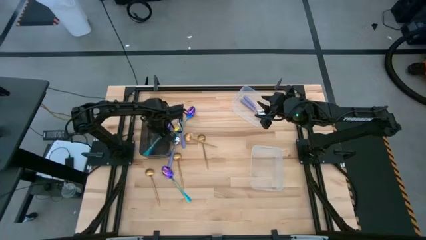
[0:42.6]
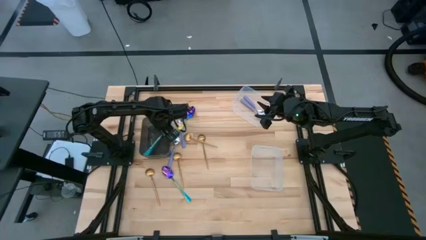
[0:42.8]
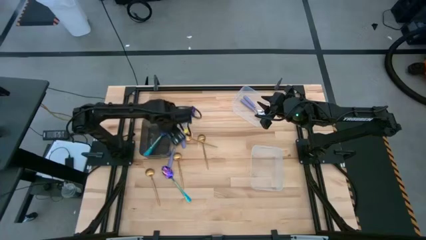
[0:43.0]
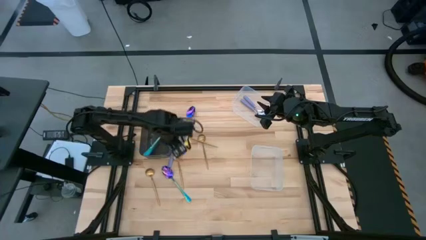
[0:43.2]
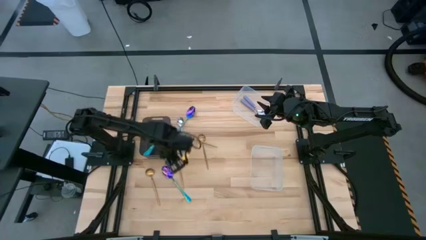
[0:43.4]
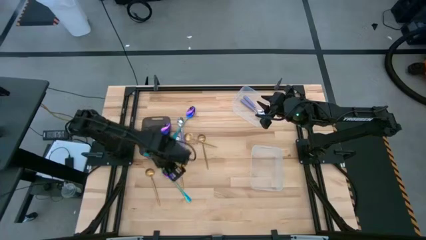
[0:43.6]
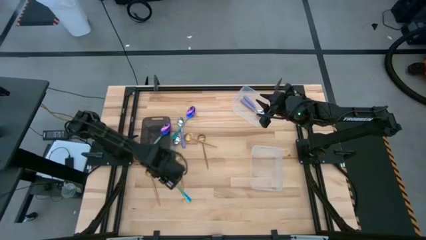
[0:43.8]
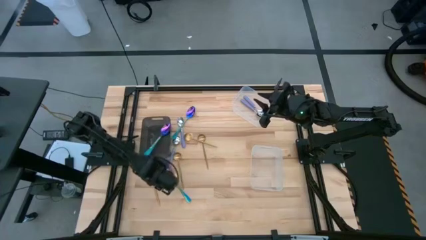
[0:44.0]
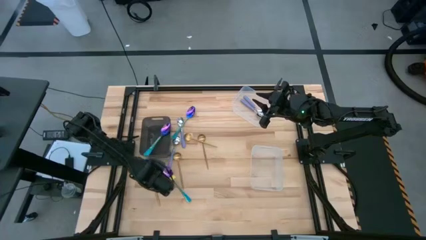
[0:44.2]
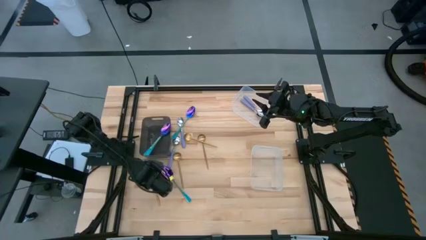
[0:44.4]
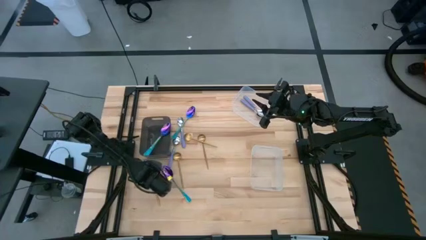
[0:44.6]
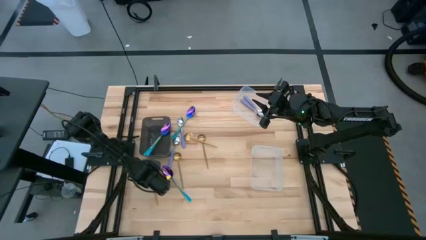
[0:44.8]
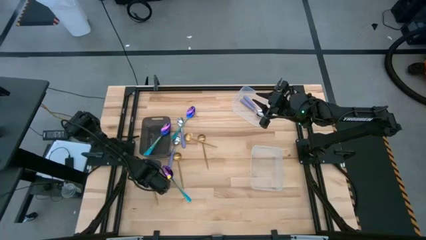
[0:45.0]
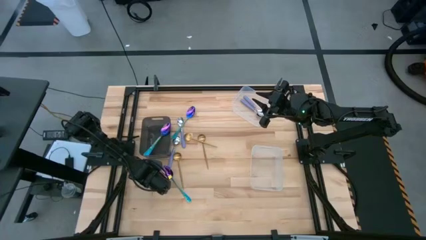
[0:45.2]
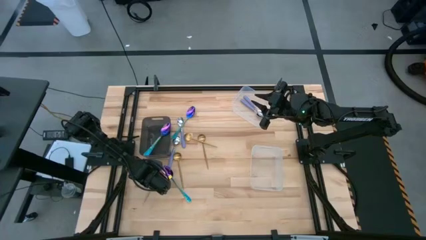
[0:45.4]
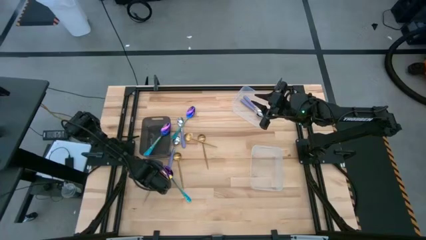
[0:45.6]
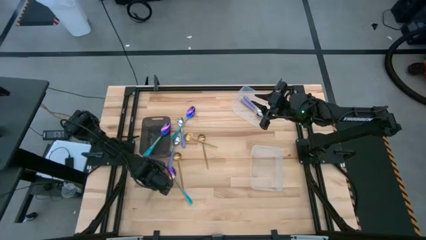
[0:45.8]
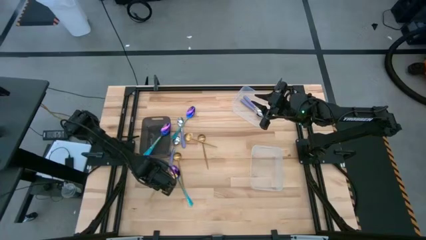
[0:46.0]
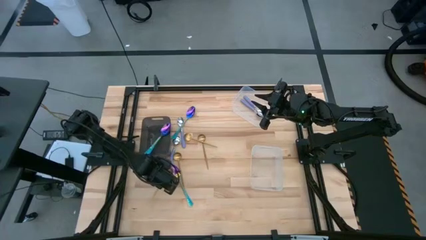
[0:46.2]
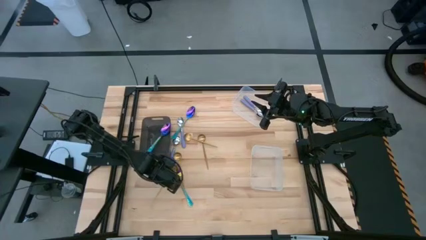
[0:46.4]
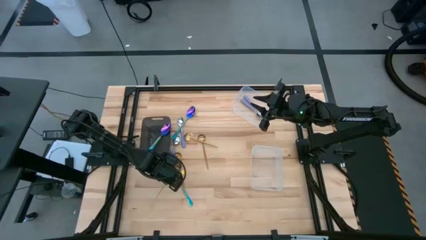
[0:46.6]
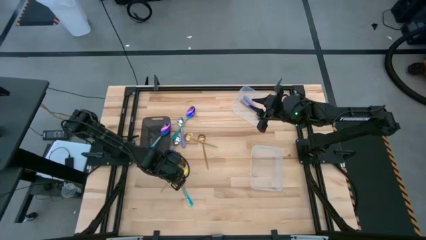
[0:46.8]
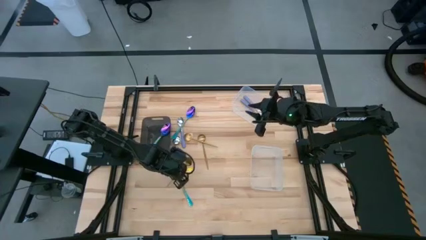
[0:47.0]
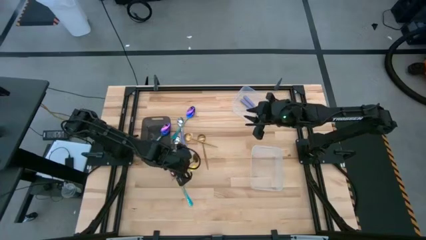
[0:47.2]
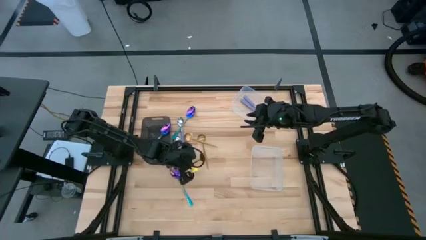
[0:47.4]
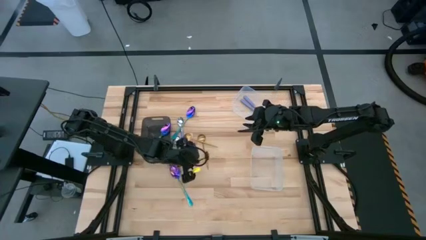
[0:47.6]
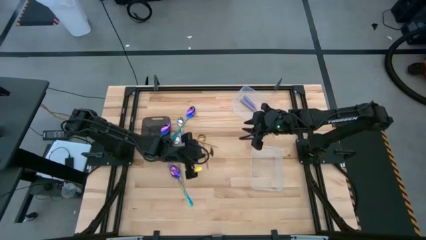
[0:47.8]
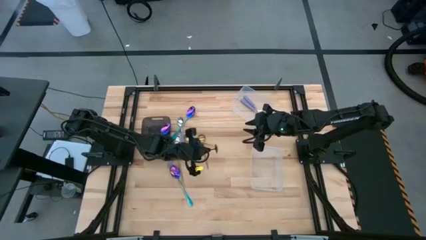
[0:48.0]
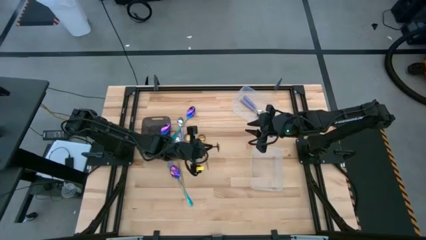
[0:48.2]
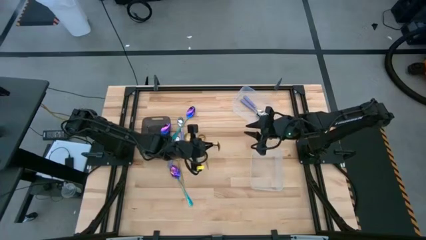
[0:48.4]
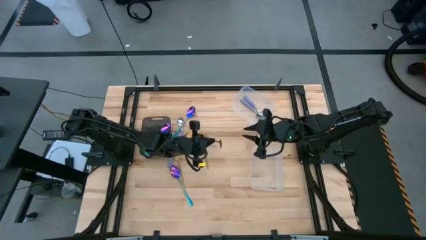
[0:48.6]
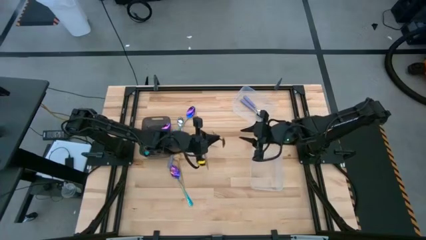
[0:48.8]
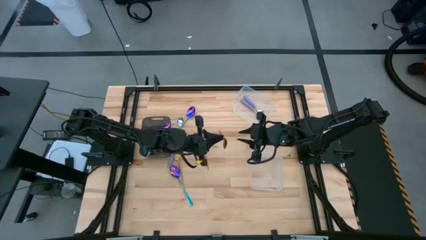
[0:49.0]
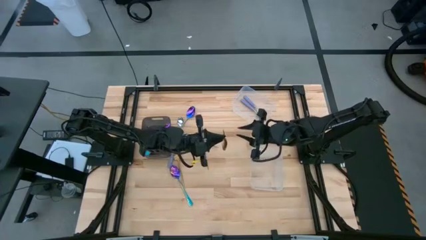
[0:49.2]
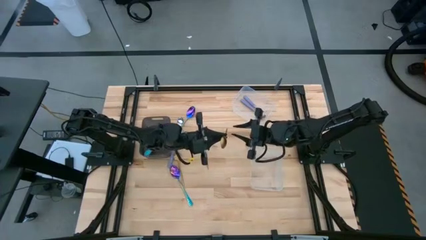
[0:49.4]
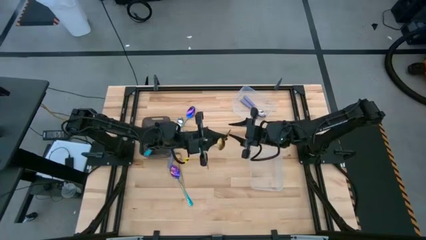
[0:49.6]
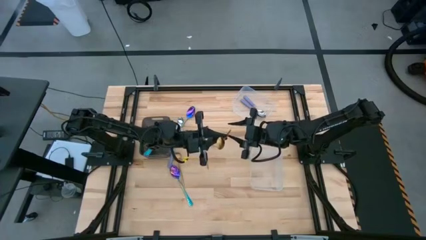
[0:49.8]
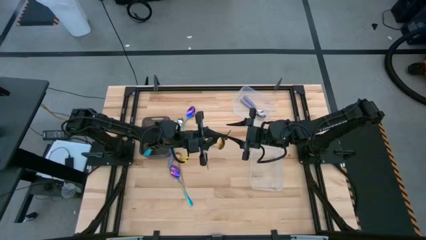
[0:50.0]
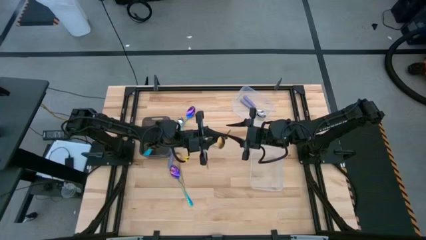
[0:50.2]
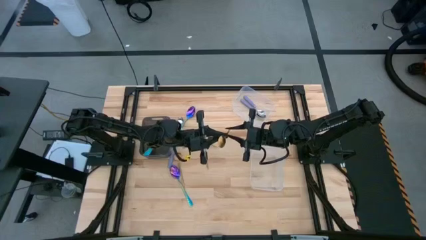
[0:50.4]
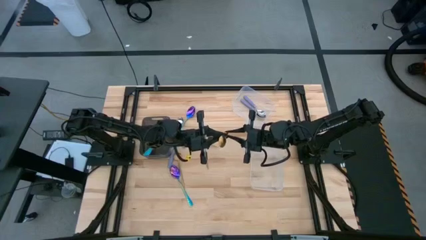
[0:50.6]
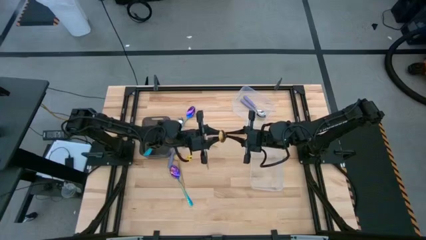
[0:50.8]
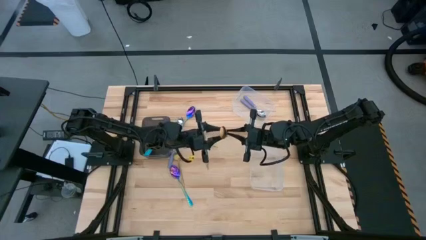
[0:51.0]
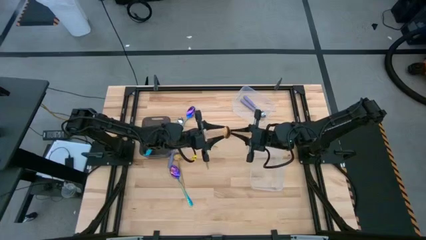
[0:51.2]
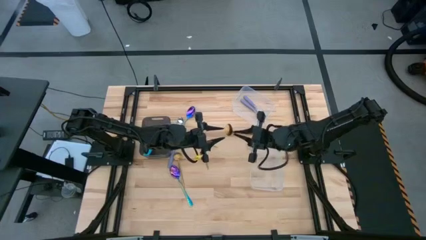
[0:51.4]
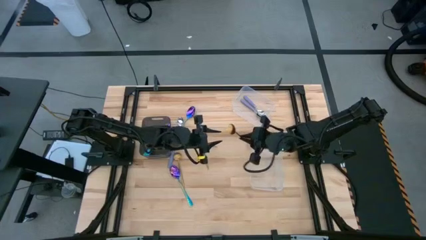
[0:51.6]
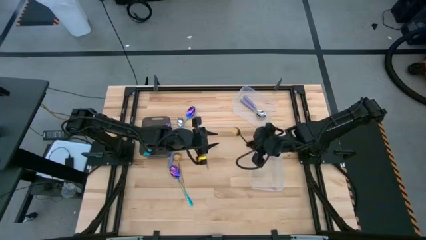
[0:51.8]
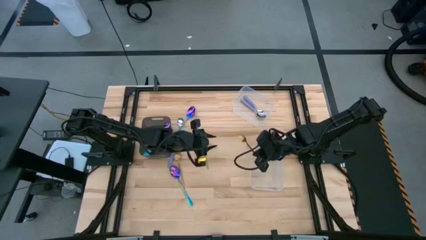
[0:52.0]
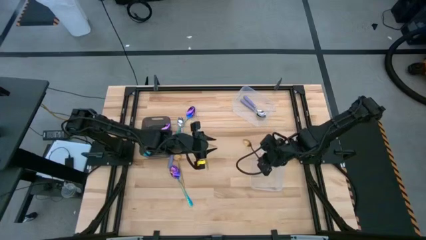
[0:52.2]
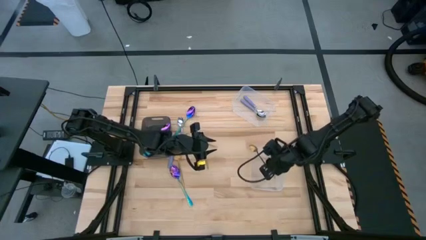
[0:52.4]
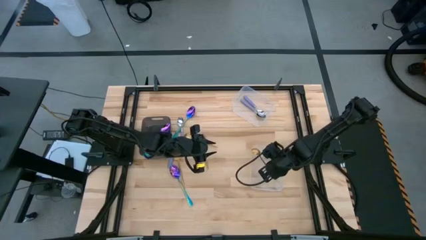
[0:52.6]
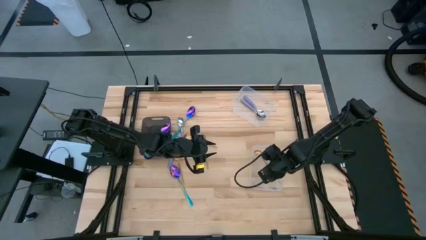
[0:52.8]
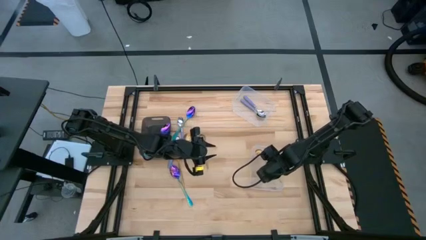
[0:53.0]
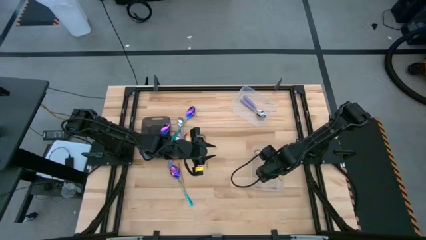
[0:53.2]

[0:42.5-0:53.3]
Task: Sort silverware by color (type)
Put the gold spoon into the bottom transparent bin

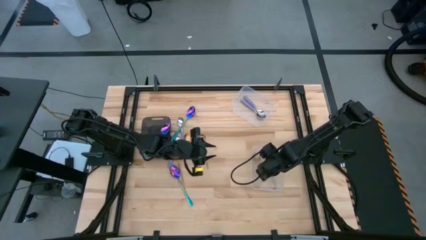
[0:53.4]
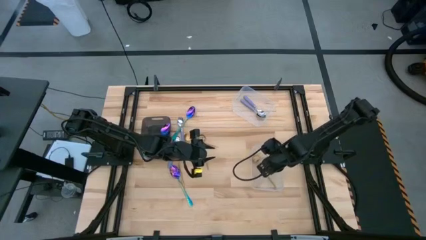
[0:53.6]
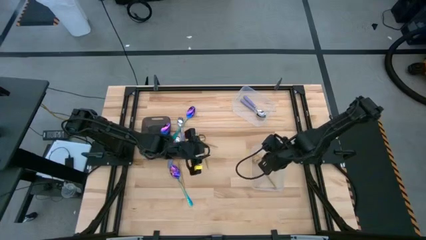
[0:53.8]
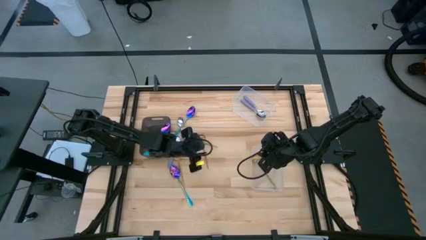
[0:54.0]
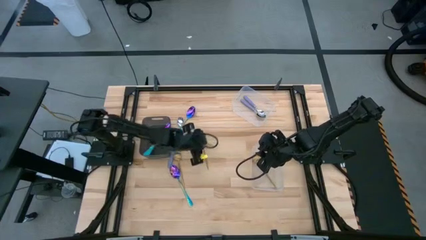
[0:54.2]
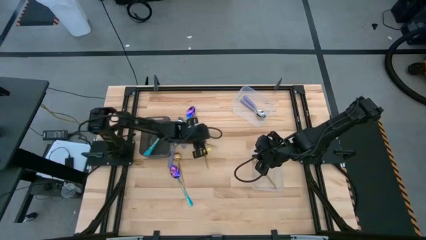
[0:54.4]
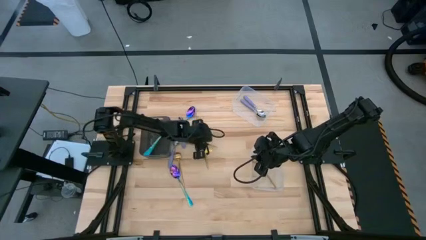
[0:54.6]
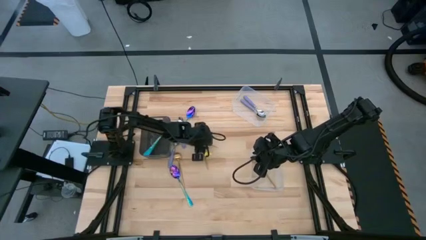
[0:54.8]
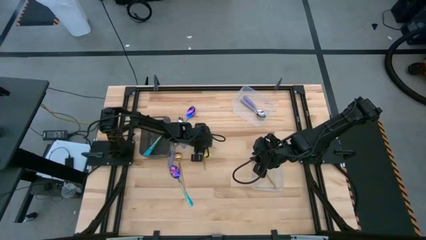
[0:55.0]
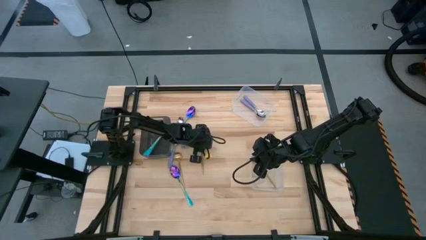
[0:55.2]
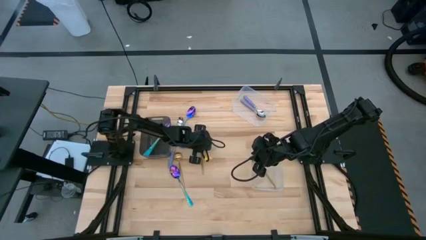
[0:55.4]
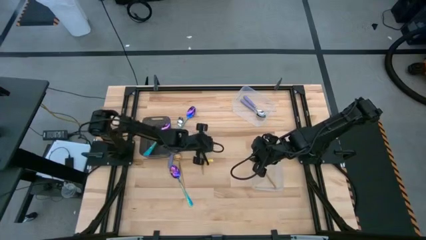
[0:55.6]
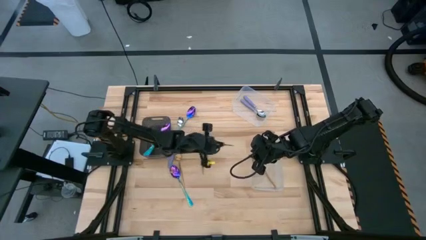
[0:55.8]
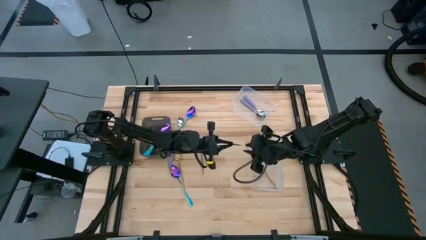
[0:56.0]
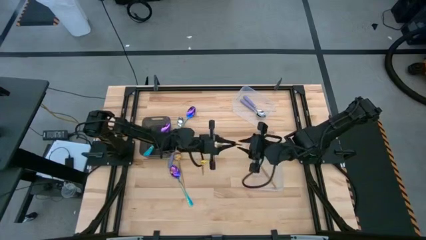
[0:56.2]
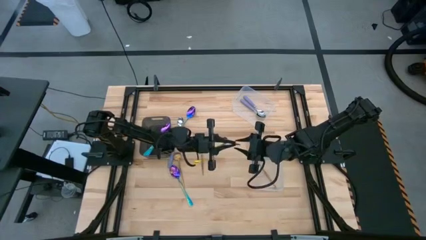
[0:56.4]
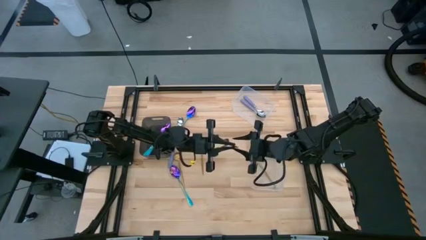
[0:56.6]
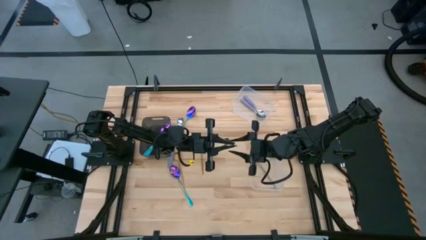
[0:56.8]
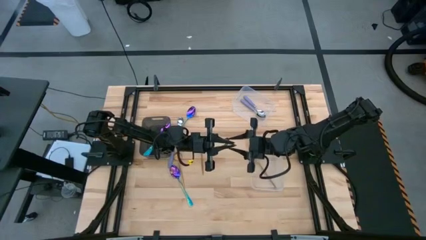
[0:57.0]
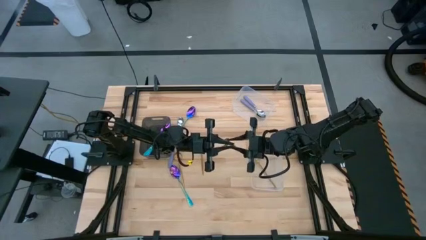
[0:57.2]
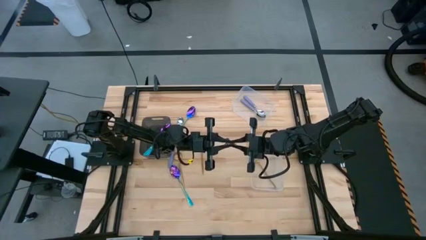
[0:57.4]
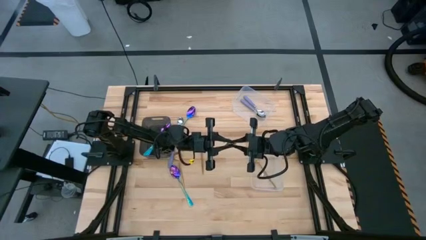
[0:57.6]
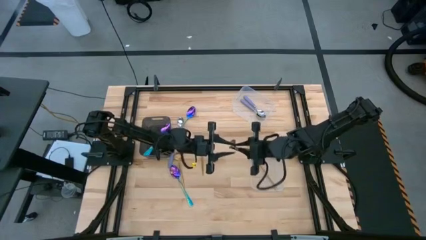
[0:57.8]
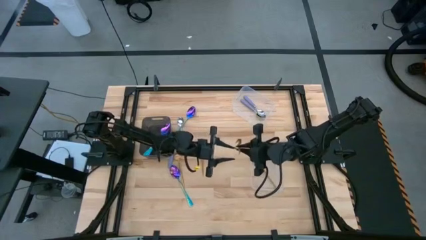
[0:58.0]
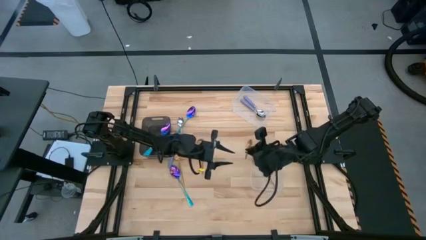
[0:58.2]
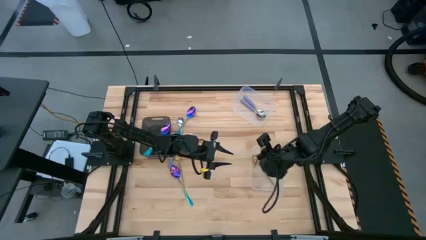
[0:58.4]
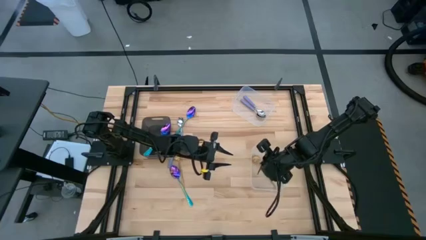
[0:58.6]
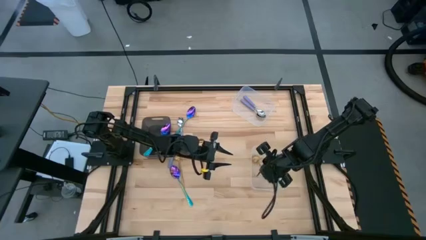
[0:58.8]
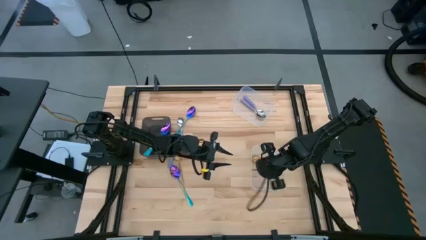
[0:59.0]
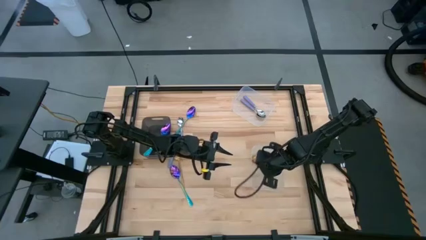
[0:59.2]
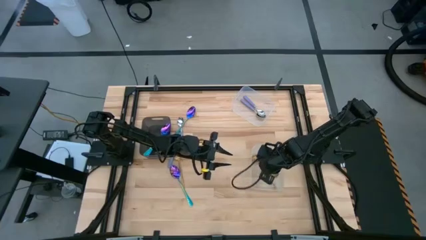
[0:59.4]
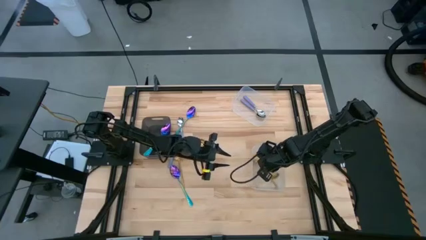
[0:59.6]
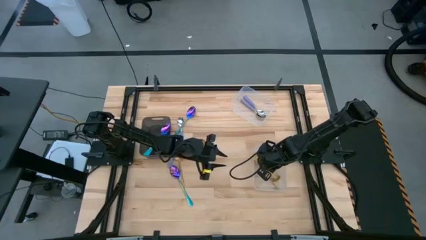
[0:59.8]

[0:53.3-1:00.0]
Put the gold spoon into the bottom transparent bin
